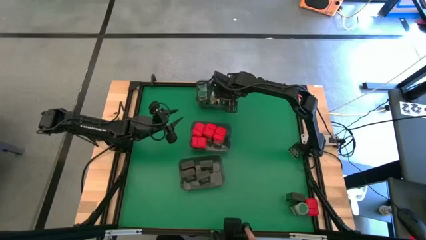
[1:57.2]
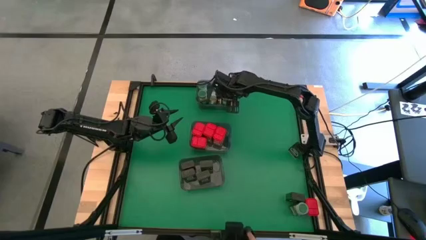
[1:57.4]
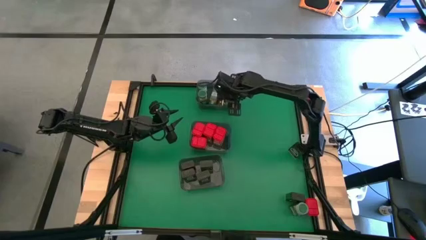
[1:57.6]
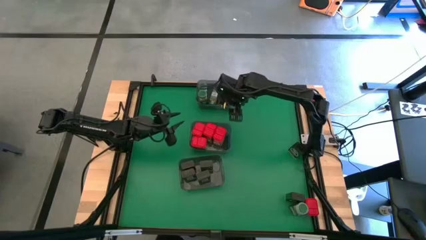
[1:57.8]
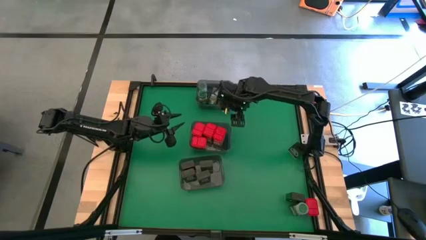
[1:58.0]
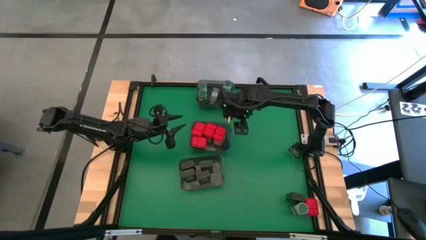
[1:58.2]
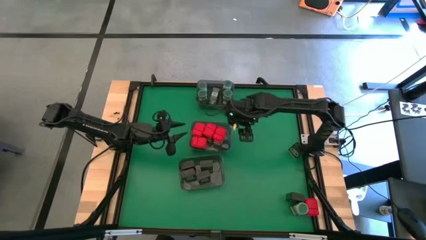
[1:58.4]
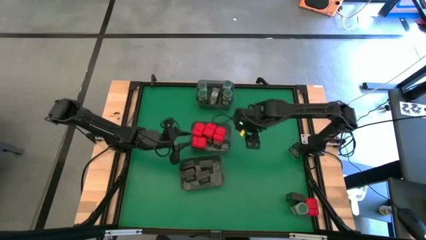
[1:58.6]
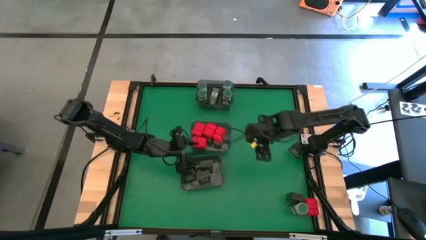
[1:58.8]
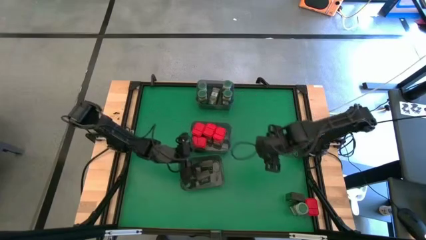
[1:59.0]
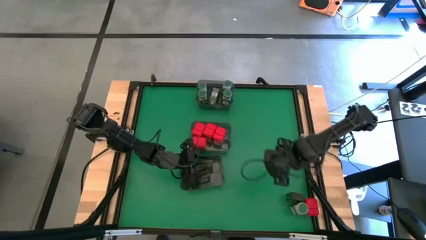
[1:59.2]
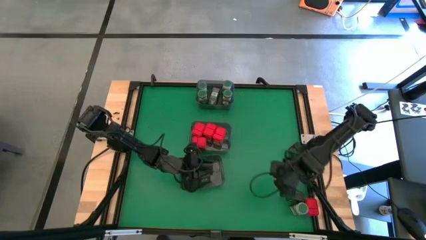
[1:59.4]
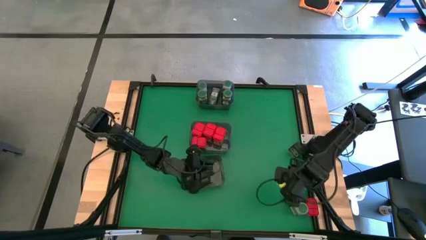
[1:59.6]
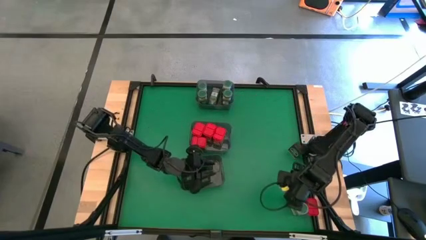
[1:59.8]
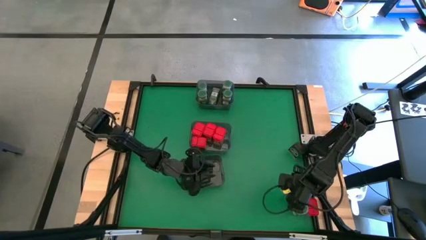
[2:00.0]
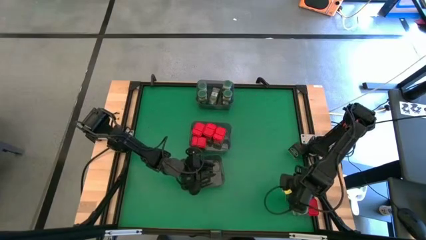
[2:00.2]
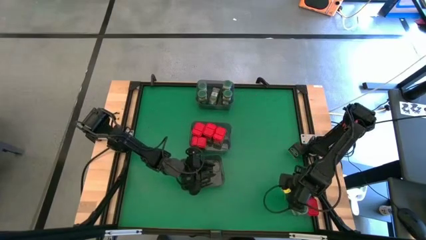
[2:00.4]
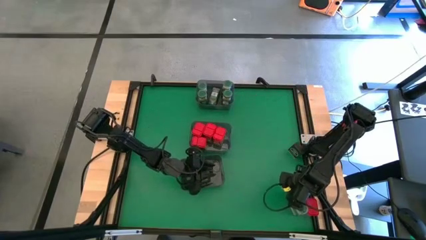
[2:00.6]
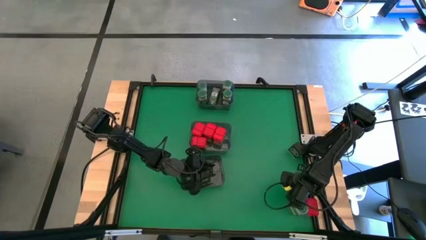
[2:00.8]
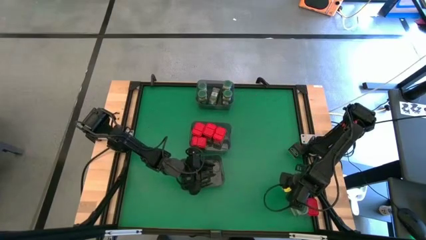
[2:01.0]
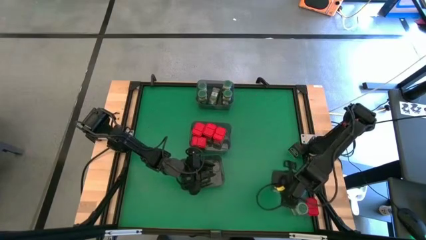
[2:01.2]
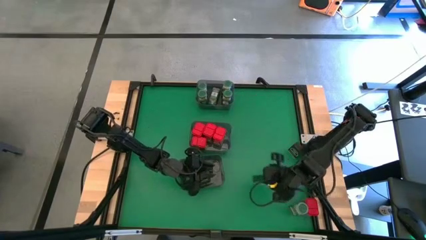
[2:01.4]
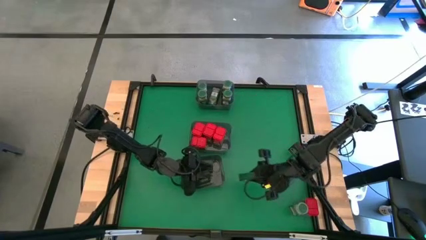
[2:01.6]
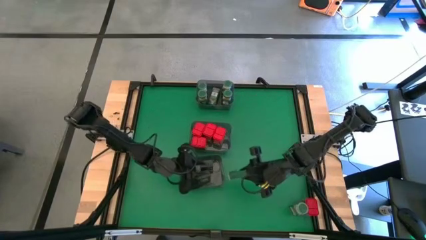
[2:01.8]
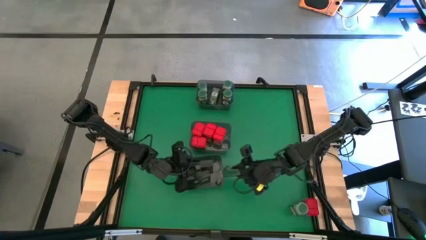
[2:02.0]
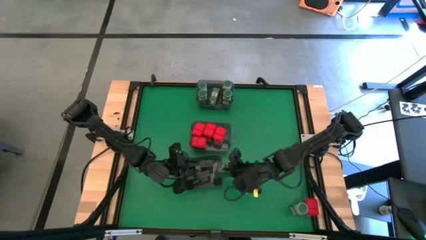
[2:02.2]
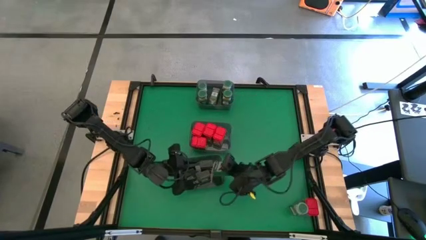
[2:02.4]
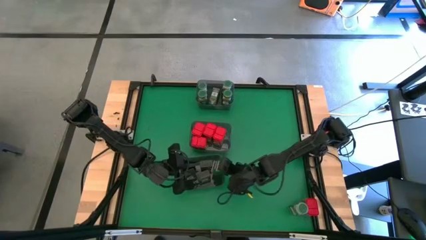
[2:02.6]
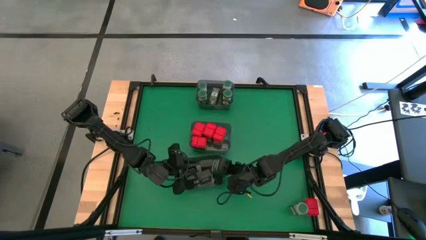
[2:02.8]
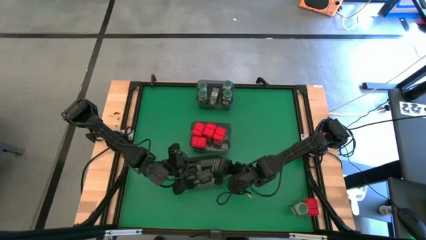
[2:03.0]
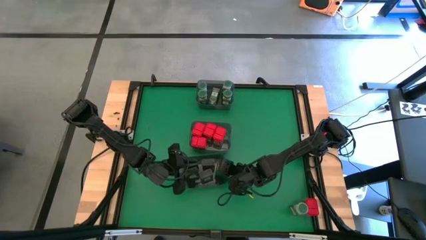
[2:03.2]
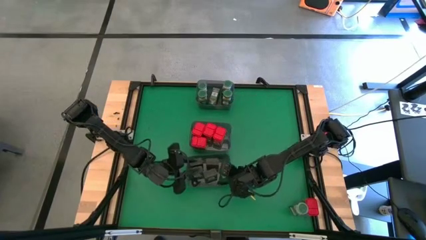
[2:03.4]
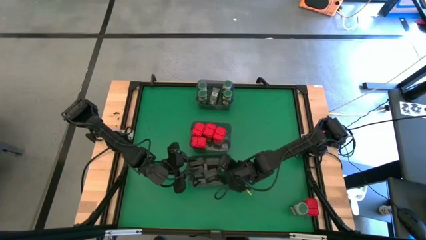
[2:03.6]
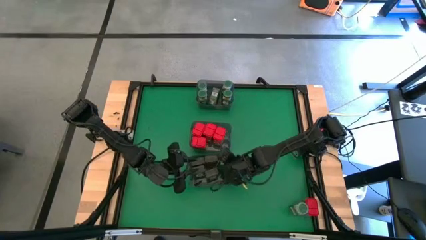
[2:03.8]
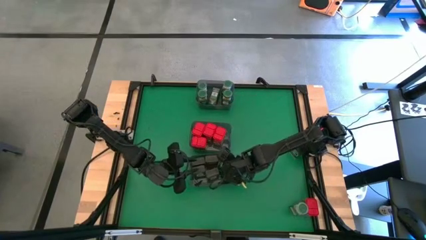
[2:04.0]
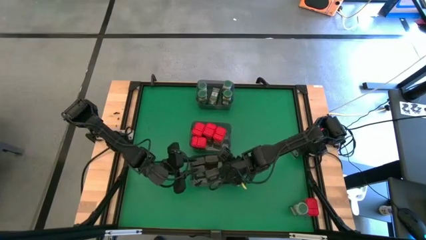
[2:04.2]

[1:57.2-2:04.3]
Task: Sort spices by type
Put the black seasoning can into the bottom gray bin

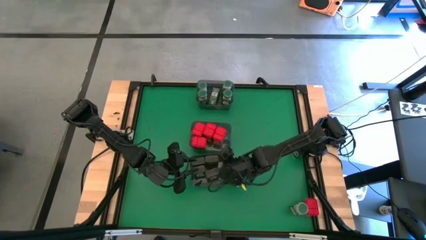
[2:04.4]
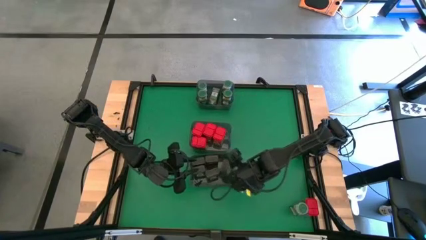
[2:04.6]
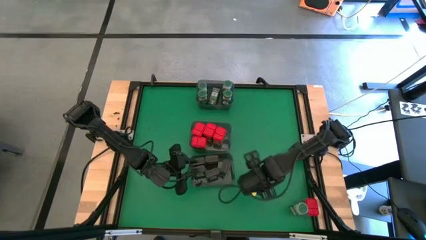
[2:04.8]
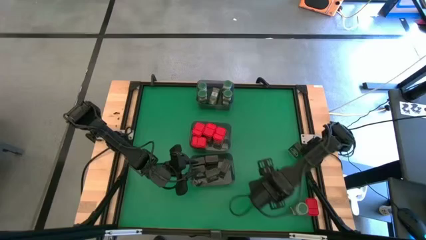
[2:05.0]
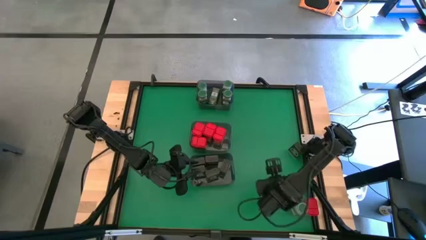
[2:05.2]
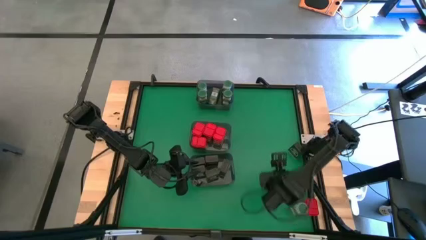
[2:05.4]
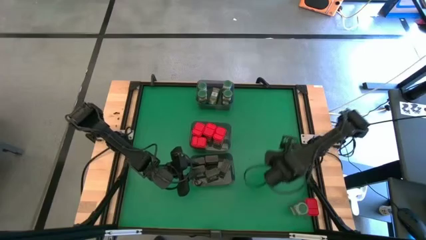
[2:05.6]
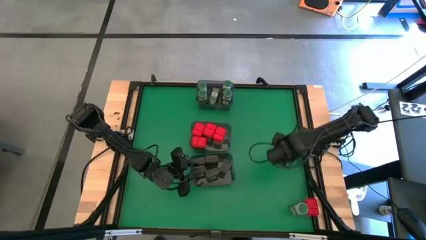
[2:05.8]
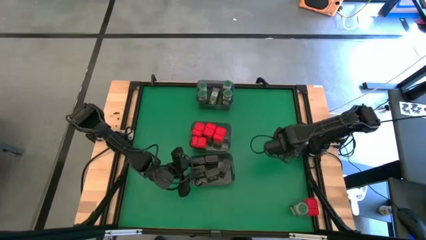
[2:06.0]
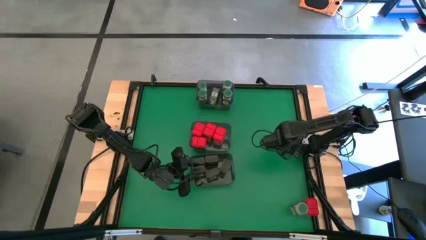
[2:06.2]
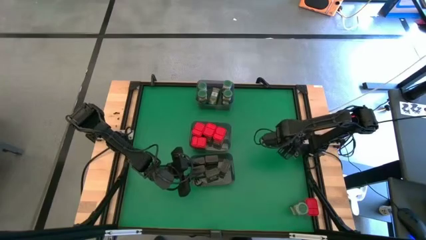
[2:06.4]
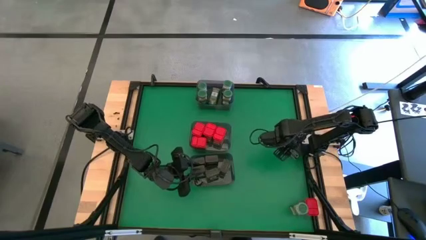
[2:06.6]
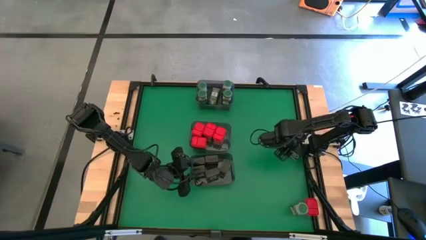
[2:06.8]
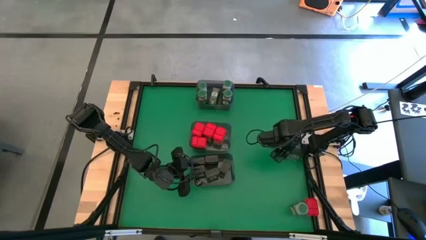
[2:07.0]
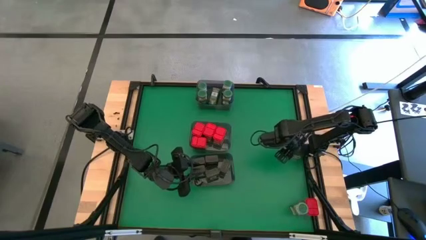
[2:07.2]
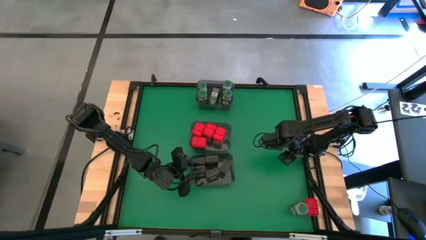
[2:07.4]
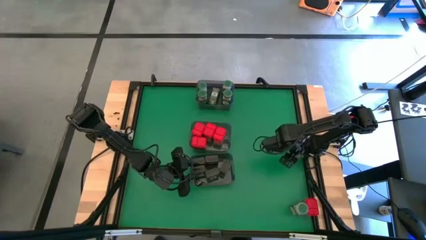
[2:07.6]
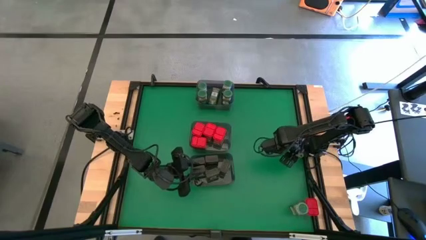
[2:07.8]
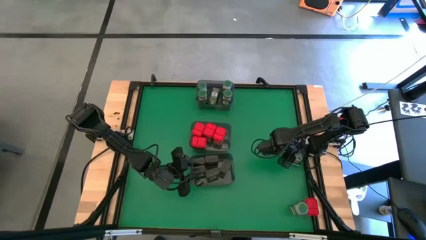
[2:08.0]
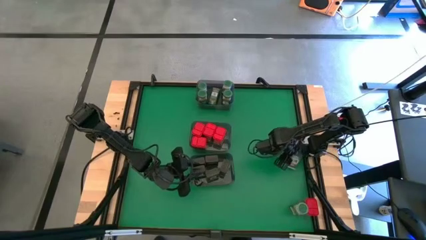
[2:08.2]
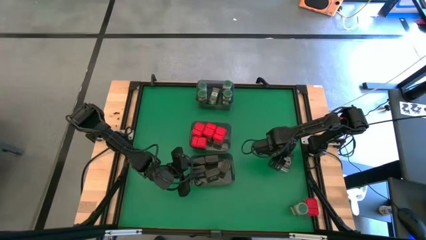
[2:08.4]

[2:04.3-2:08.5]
Put the black seasoning can into the bottom gray bin

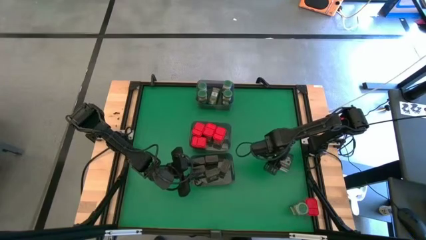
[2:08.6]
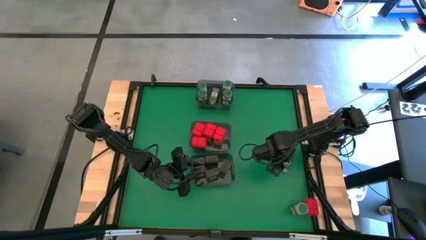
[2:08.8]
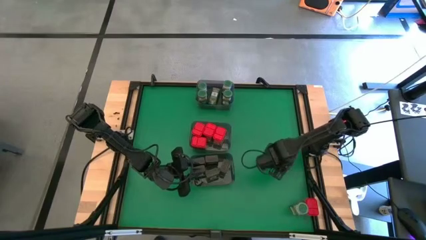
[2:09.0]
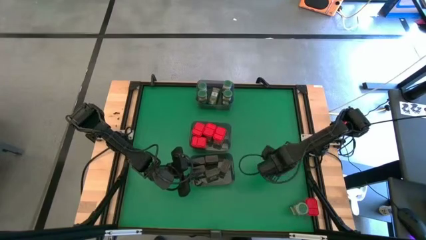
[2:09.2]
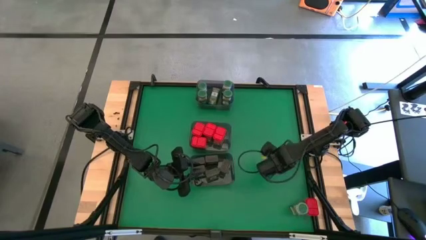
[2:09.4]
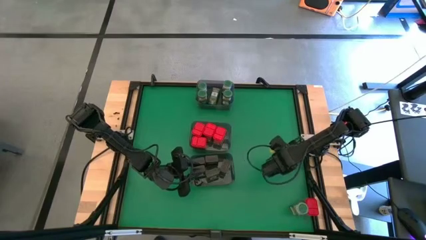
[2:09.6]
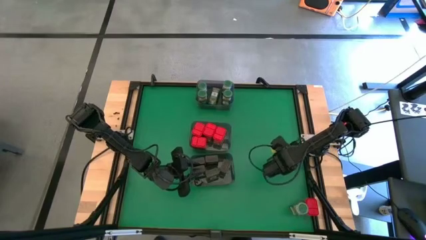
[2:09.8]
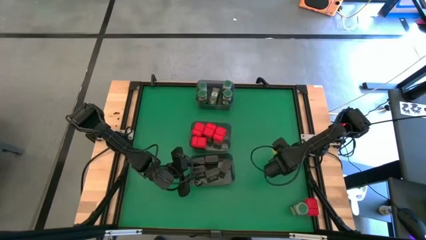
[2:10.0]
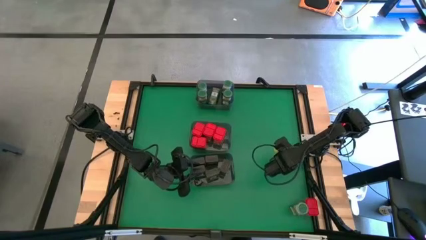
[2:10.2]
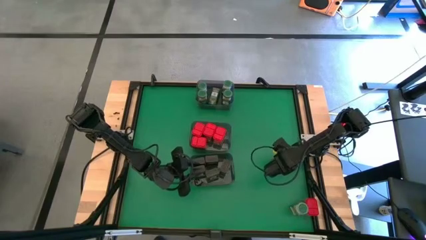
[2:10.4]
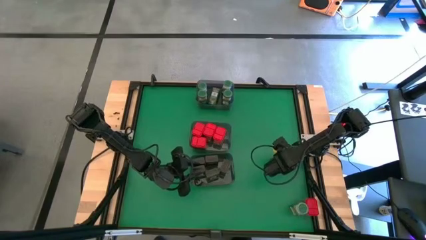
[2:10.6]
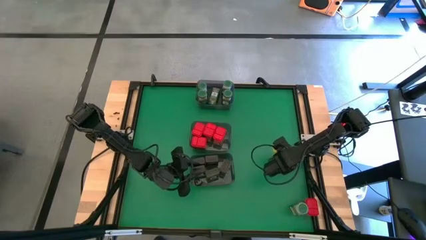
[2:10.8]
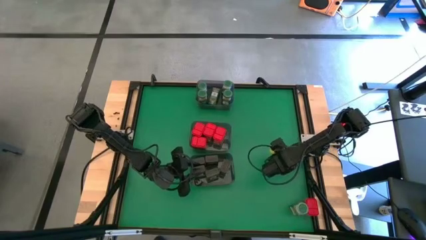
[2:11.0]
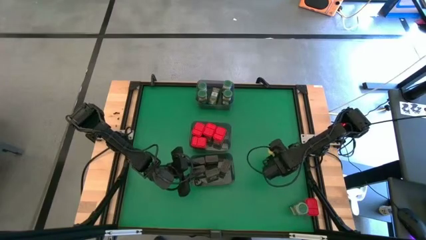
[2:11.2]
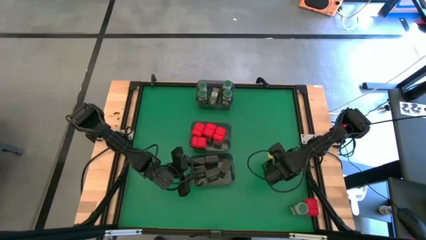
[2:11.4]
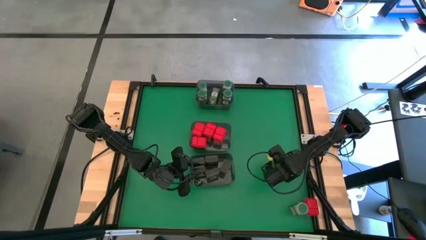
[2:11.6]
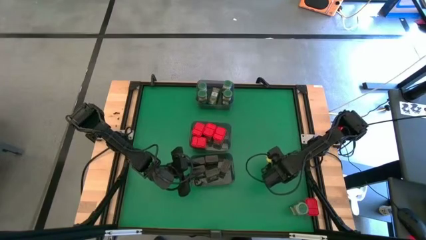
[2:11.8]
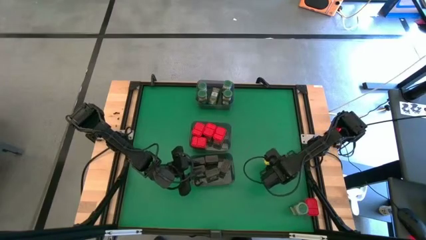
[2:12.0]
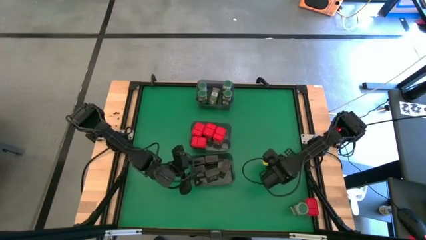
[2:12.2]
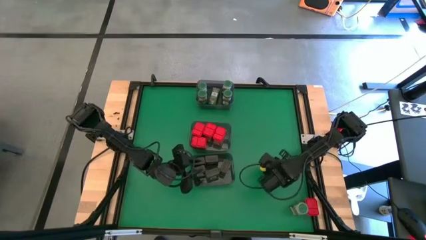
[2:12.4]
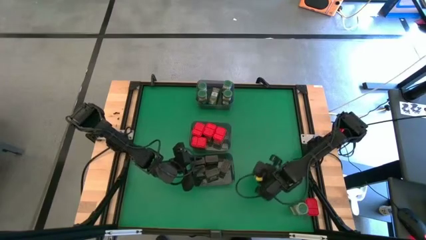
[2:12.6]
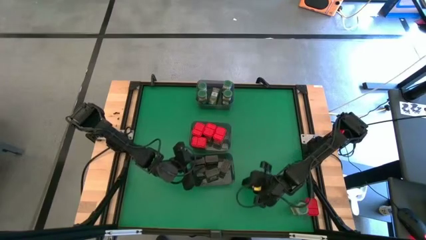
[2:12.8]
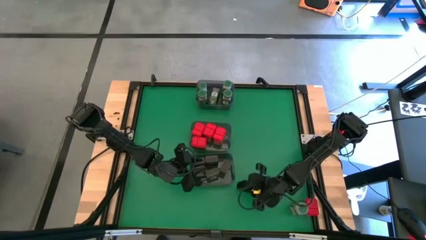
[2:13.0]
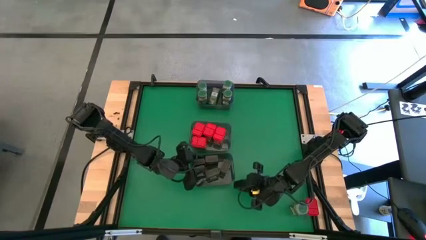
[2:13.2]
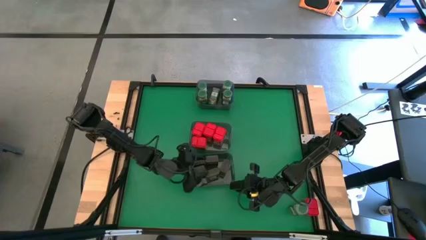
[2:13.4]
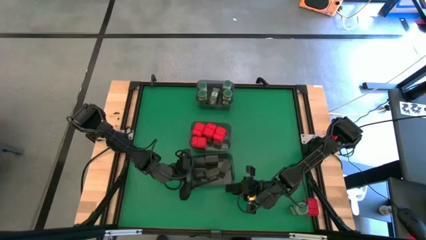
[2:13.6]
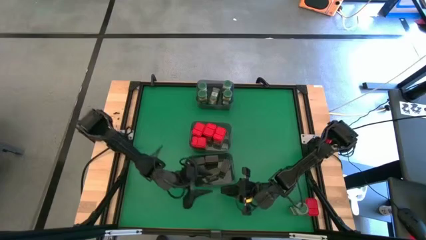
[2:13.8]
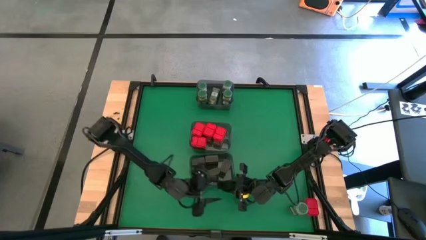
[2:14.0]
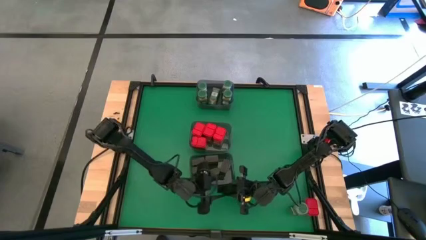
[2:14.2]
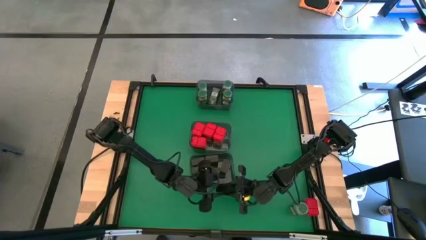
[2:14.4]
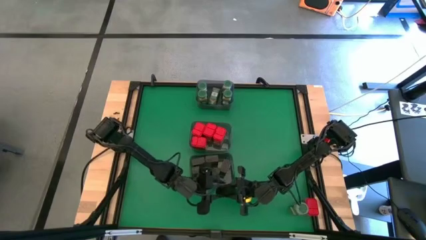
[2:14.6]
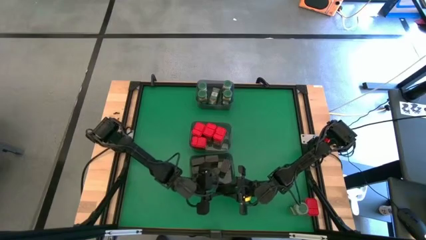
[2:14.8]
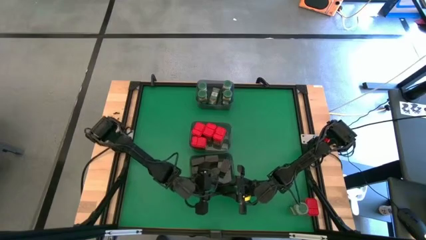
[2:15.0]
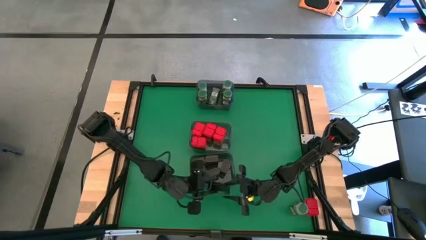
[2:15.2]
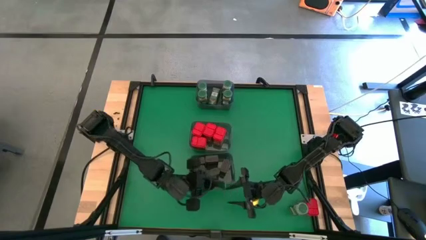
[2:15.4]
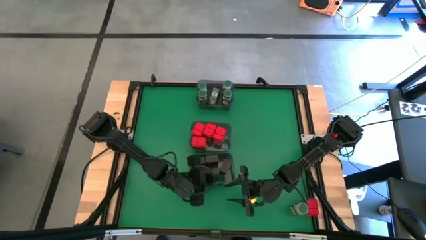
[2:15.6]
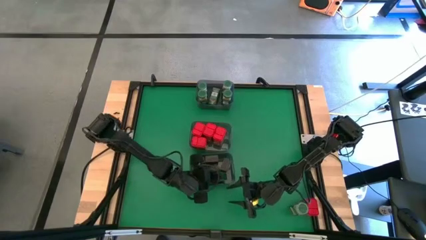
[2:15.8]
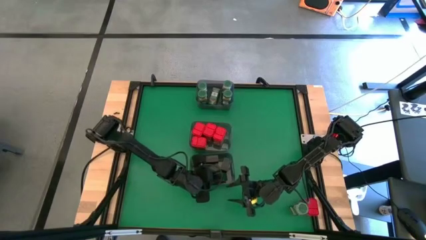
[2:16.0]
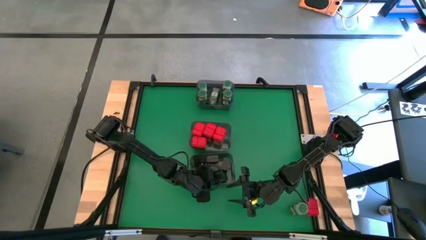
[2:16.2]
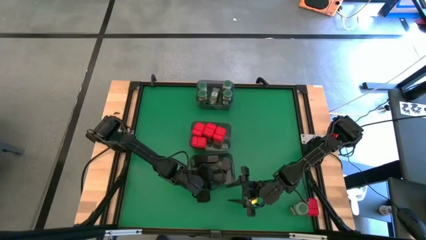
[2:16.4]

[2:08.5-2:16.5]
Put the black seasoning can into the bottom gray bin
